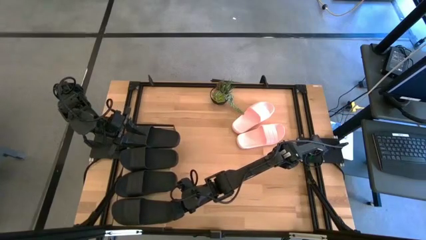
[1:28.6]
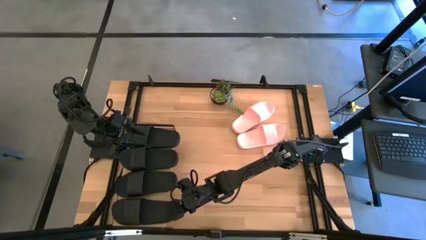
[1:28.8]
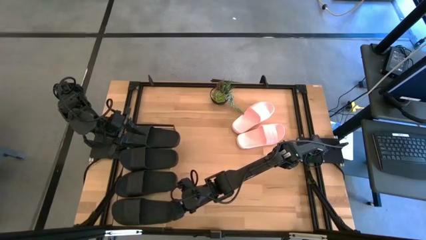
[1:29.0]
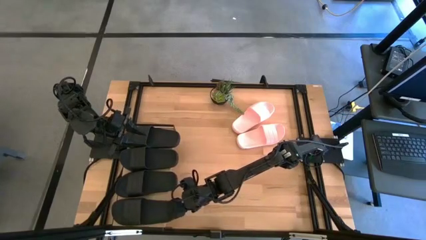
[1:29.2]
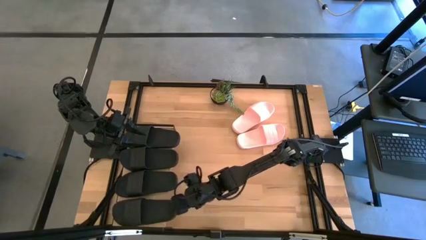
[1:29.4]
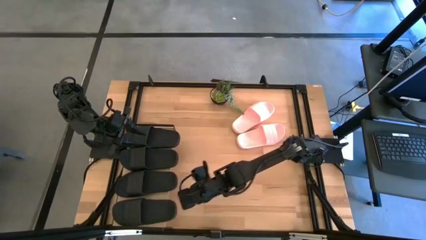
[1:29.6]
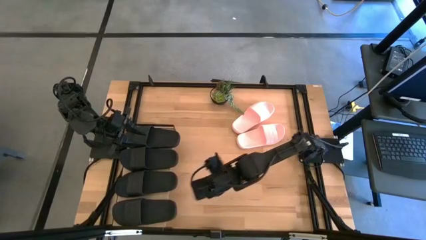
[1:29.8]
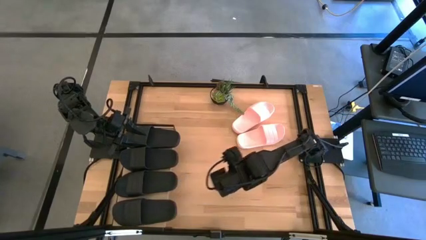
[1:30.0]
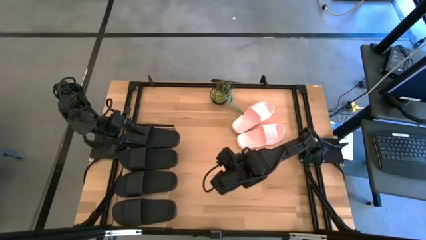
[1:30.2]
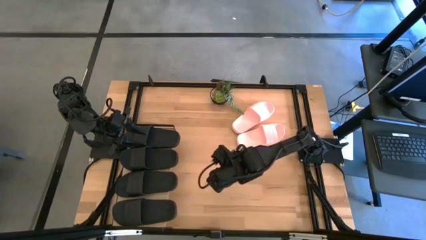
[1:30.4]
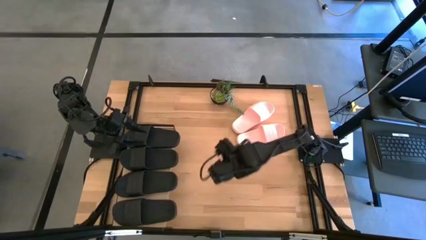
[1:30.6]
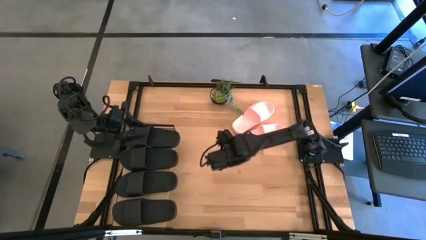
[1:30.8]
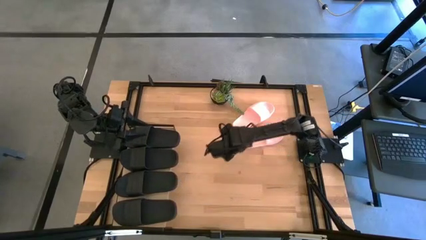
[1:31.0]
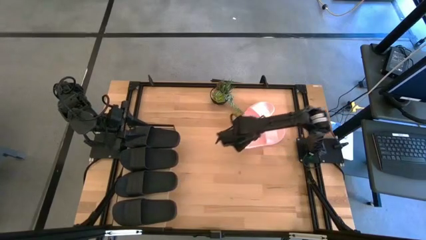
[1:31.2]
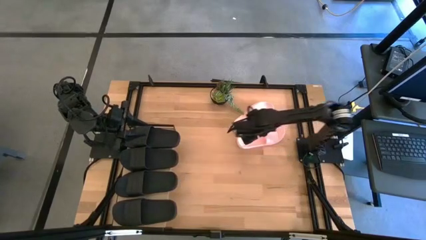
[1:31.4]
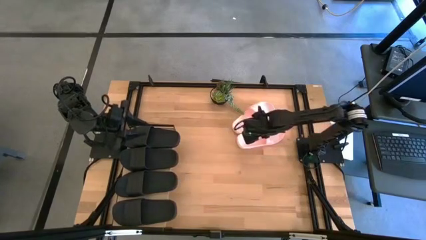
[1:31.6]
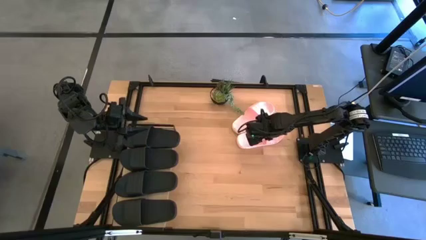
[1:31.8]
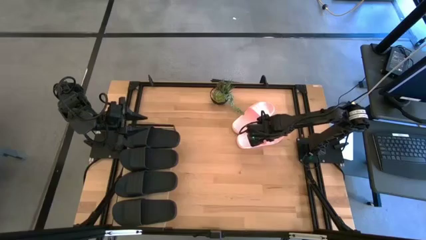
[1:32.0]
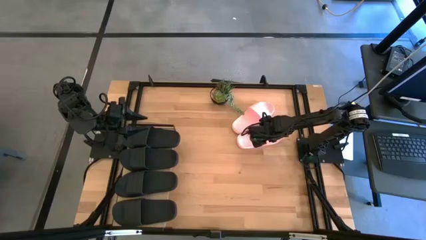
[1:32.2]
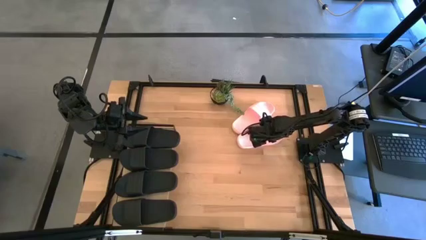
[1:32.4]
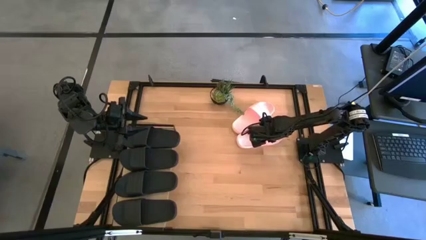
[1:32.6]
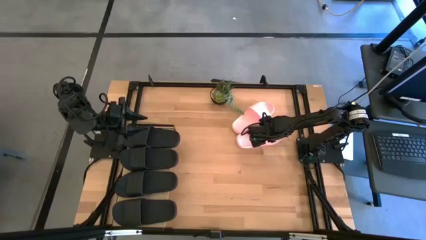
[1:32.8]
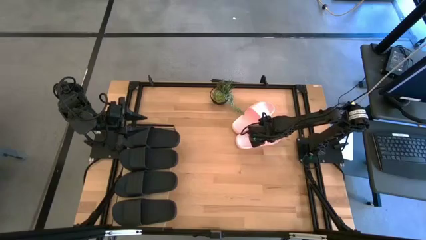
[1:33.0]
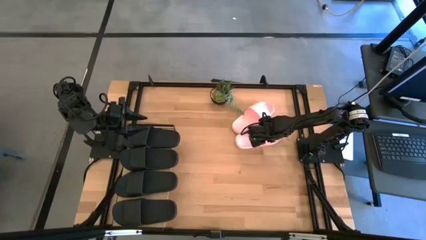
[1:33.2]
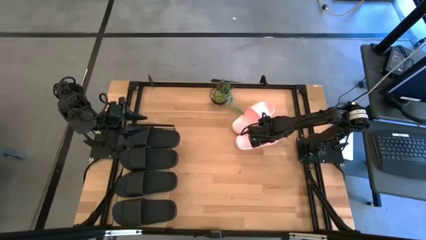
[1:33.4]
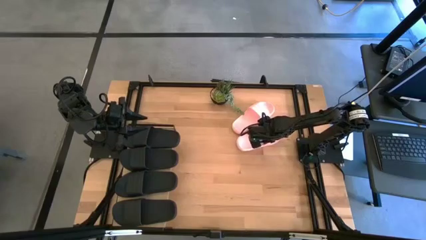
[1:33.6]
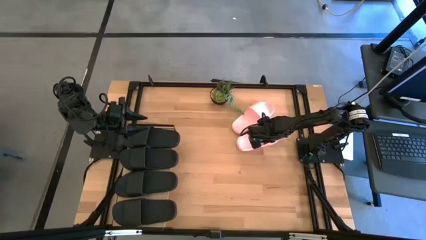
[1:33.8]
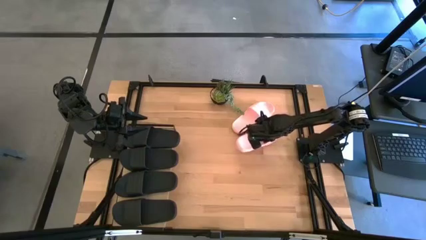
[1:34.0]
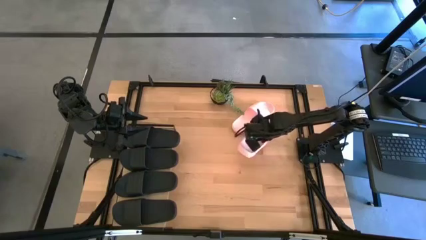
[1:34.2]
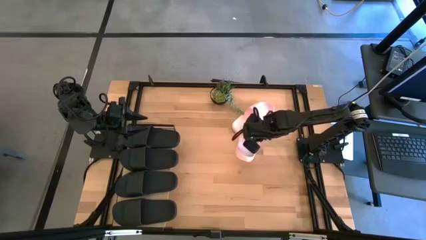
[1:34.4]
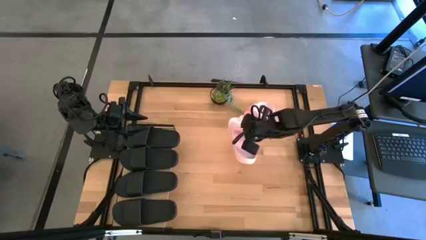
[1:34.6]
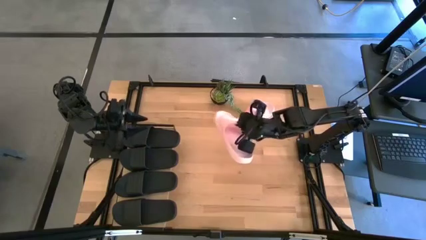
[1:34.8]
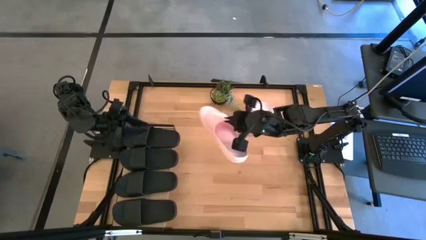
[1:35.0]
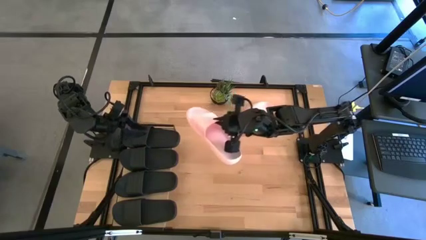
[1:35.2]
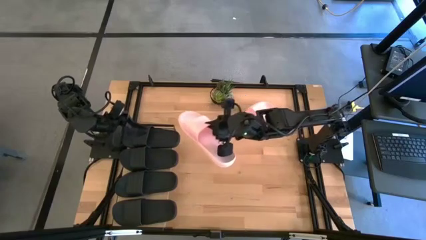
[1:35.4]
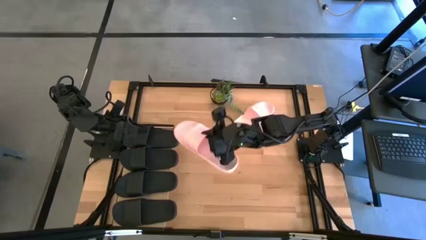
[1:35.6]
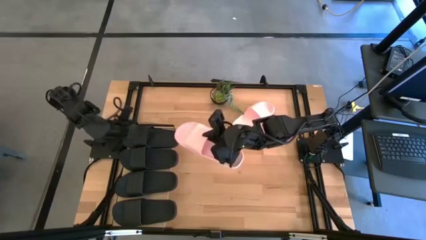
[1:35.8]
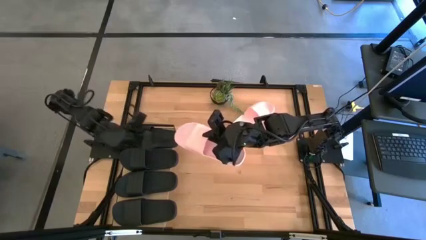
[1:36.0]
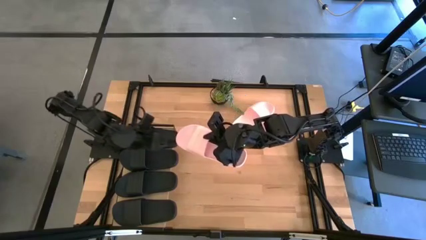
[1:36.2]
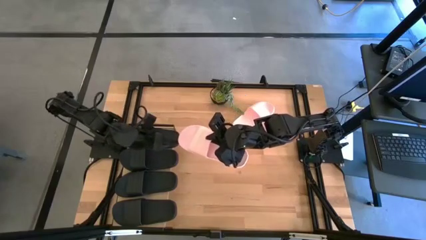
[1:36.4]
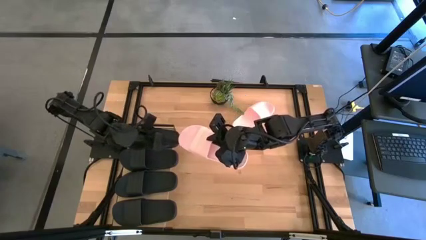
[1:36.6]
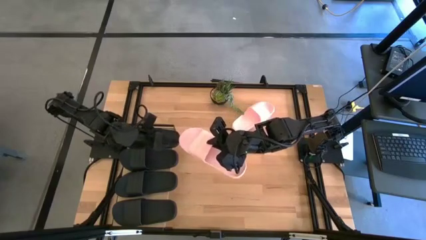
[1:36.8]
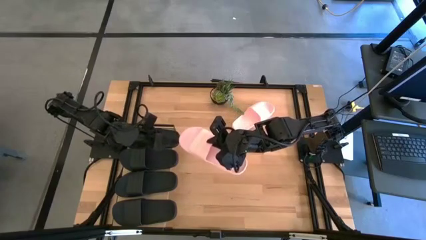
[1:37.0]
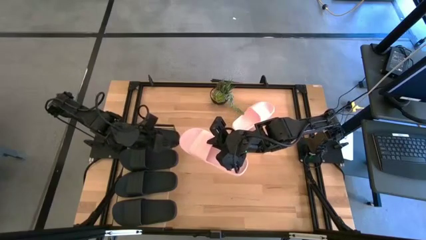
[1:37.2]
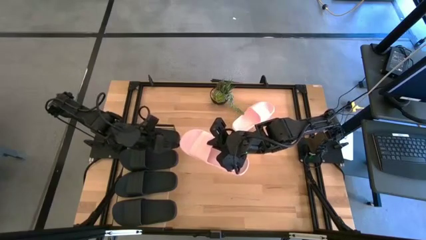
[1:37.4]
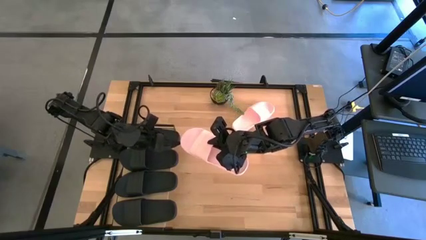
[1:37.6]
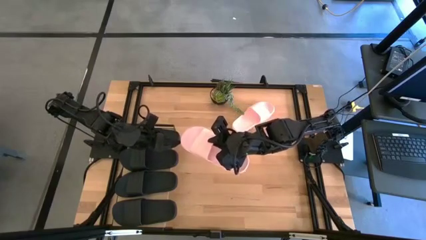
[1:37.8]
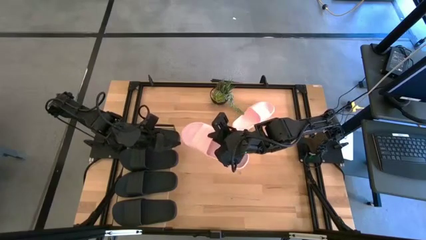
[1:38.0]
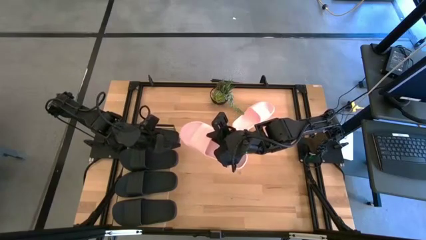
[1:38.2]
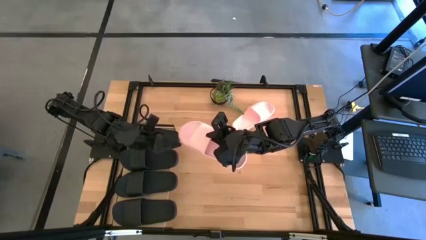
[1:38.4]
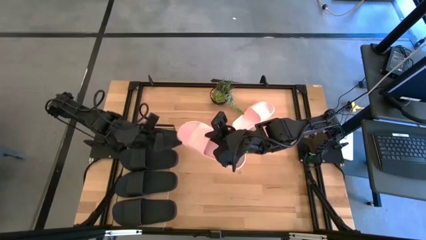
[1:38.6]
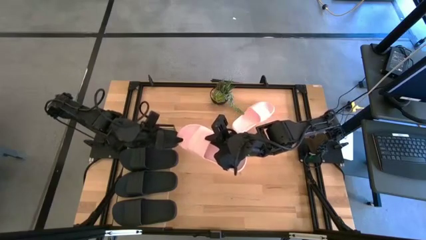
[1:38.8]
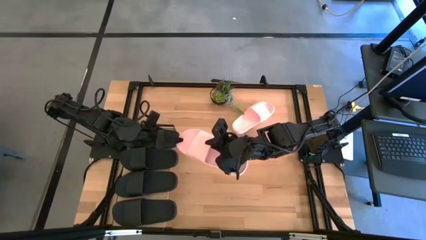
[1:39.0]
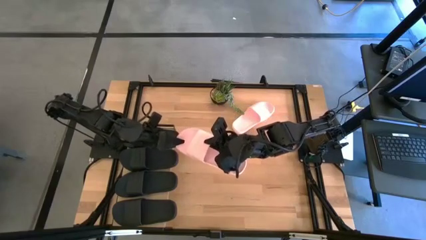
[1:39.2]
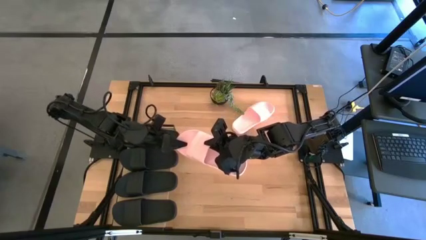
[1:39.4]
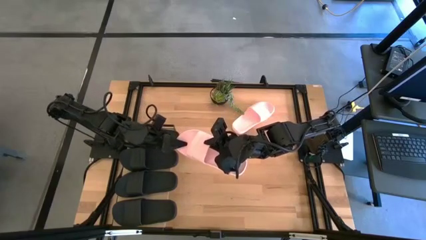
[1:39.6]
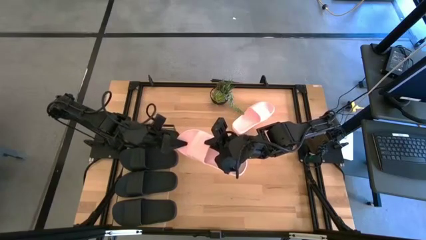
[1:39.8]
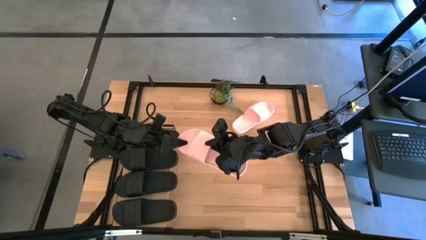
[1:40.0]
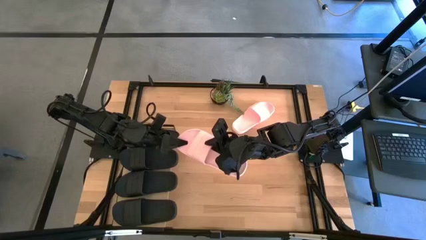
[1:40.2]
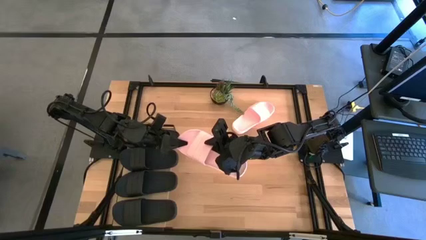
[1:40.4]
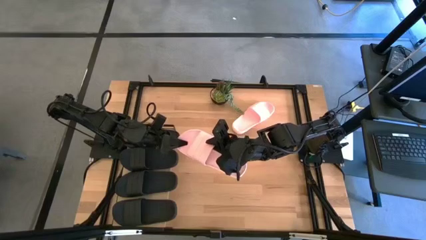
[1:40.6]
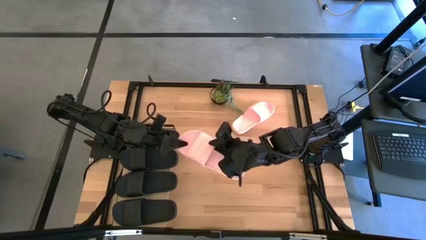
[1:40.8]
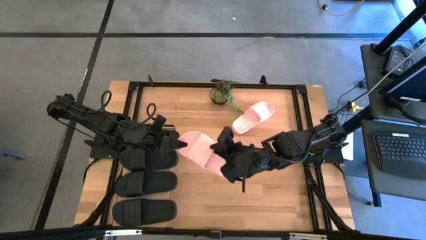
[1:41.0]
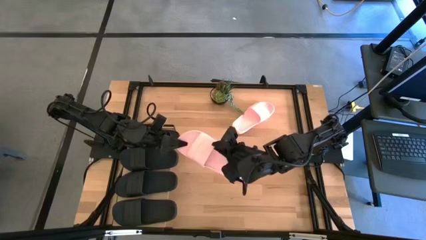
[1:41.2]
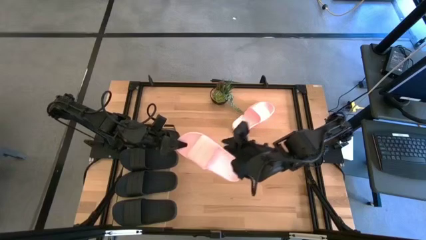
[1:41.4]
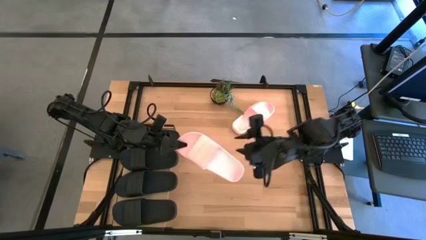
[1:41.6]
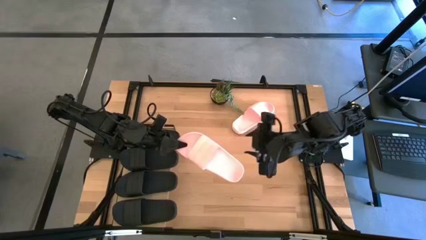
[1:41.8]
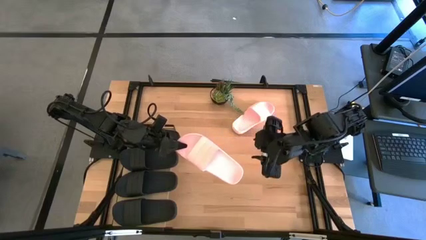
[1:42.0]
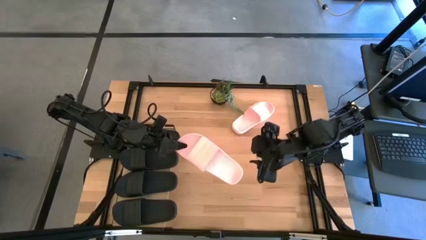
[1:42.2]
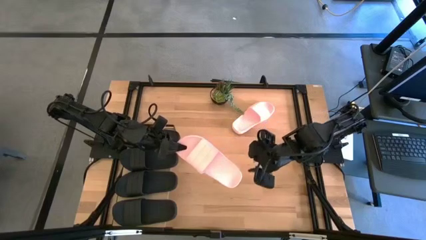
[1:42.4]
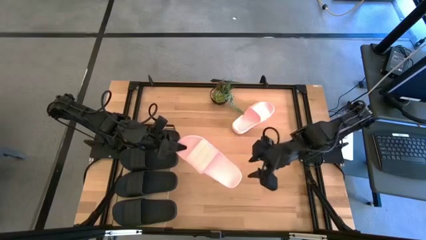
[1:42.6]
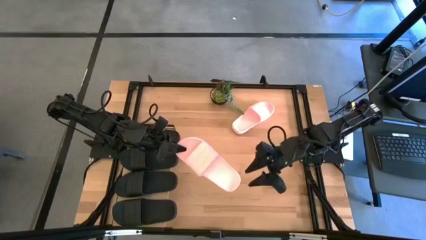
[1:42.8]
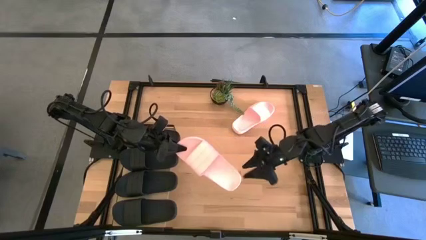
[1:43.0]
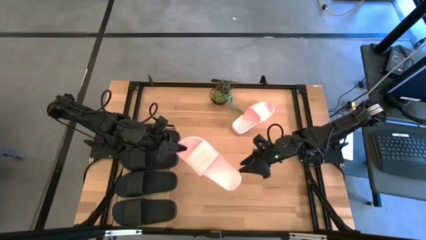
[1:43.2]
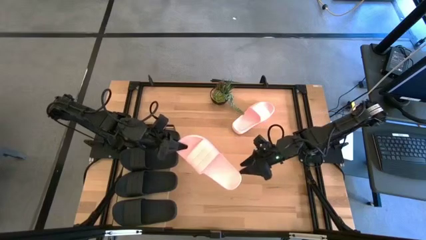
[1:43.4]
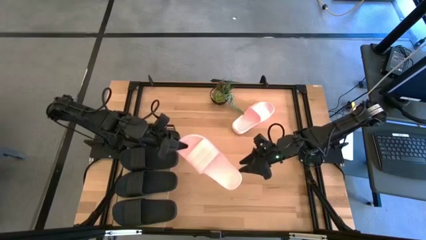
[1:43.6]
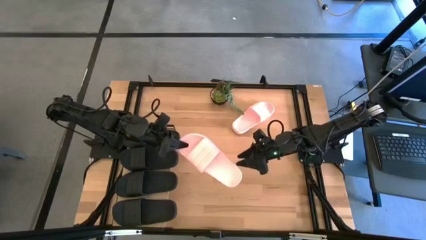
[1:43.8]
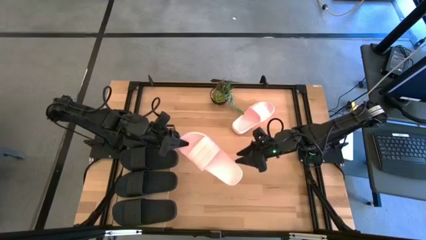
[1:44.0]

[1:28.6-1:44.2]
Task: Pick and place slides into the shelf
Put the bottom pink slipper under the shelf
